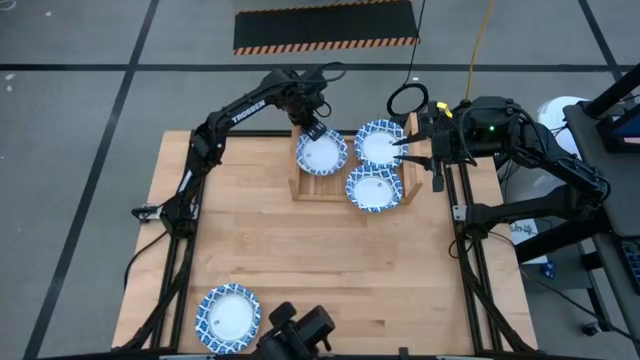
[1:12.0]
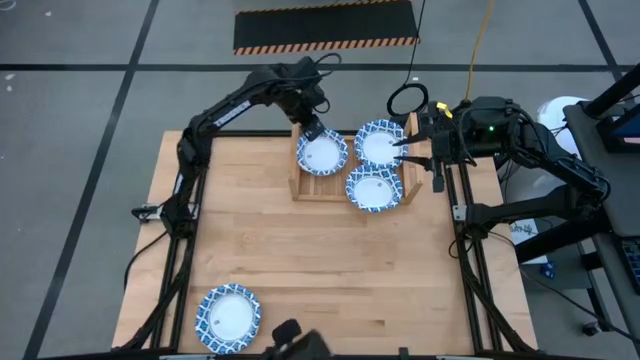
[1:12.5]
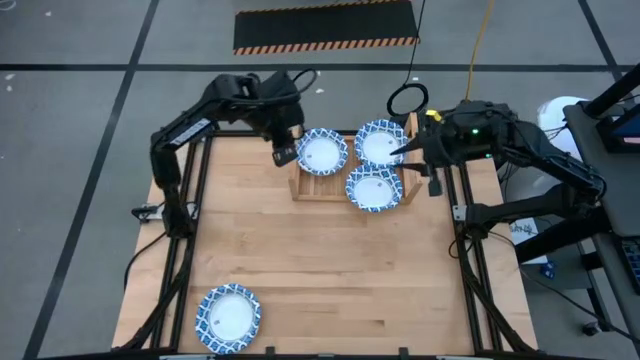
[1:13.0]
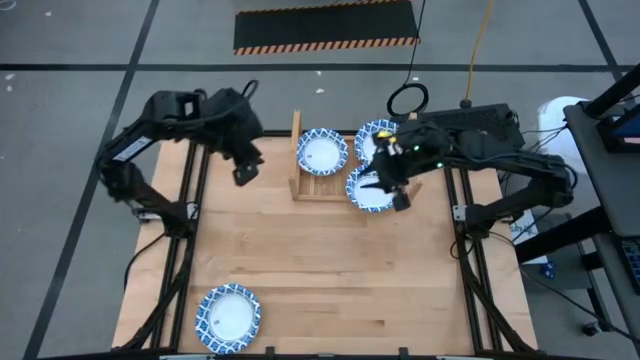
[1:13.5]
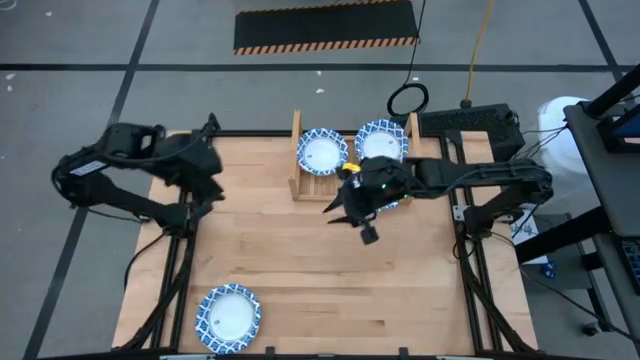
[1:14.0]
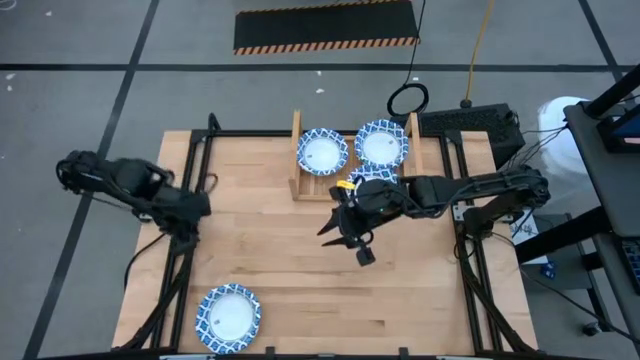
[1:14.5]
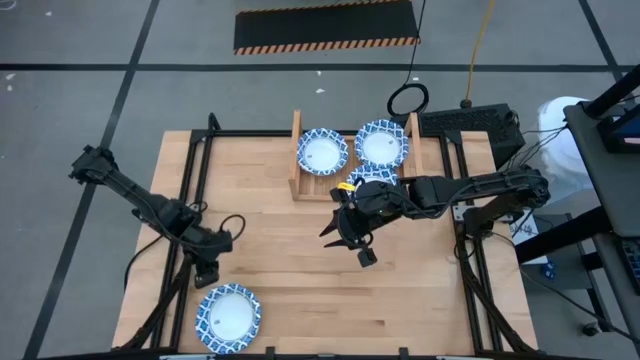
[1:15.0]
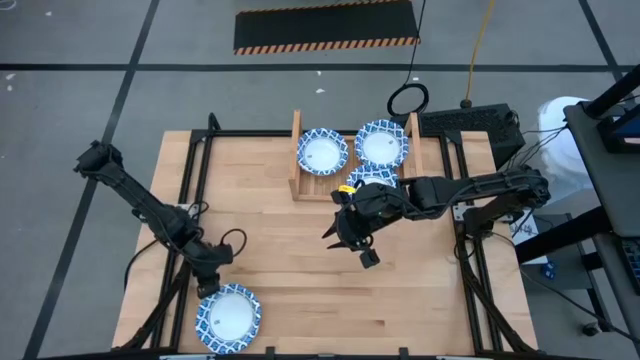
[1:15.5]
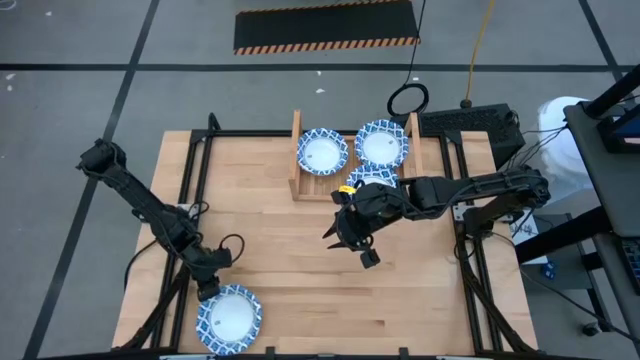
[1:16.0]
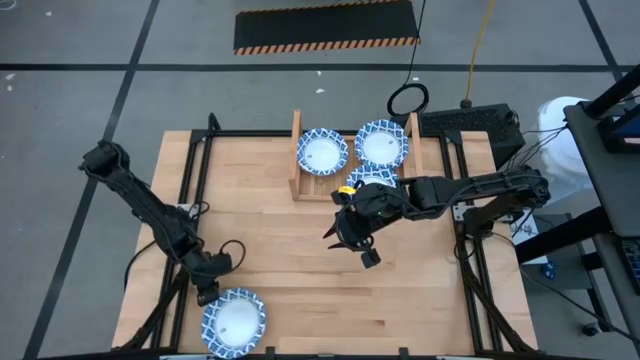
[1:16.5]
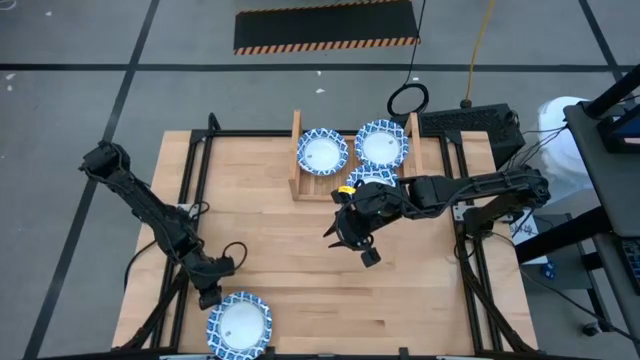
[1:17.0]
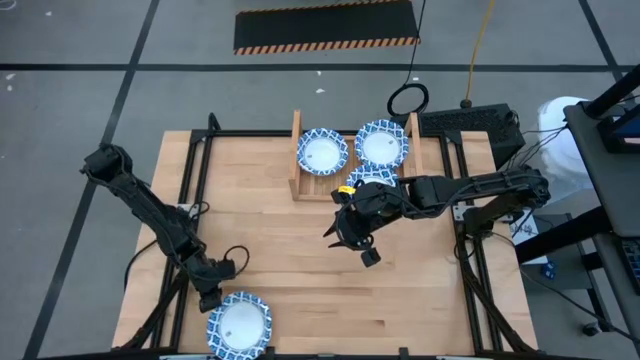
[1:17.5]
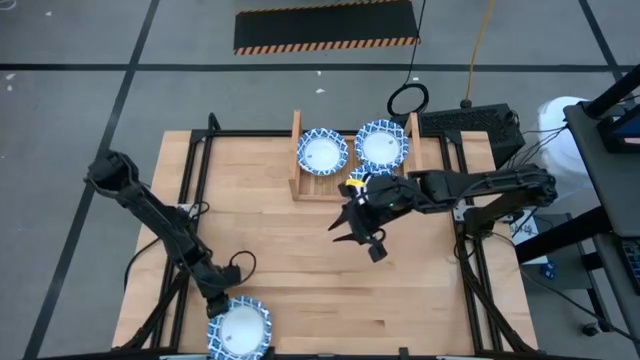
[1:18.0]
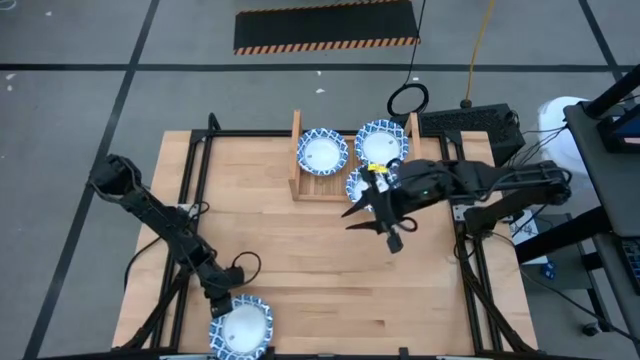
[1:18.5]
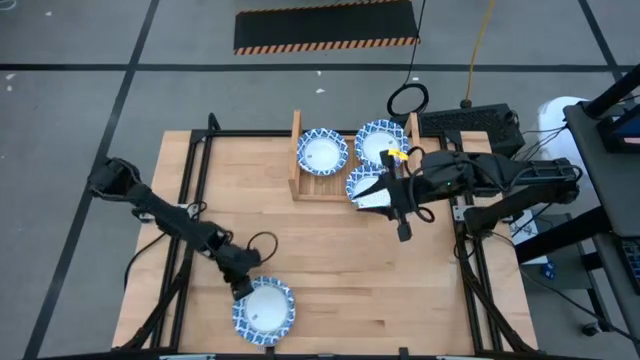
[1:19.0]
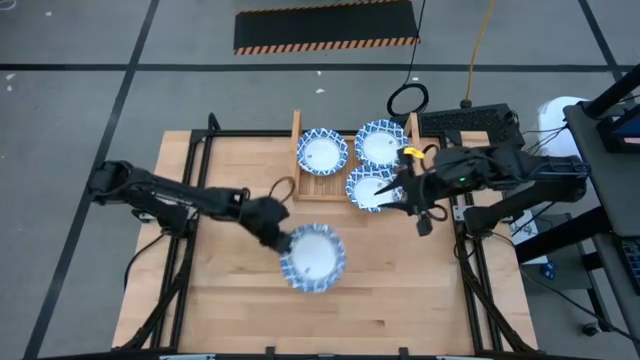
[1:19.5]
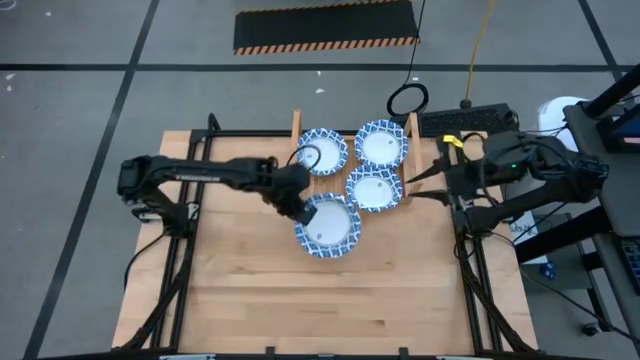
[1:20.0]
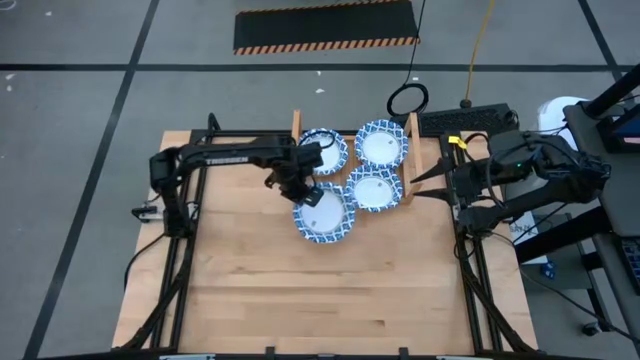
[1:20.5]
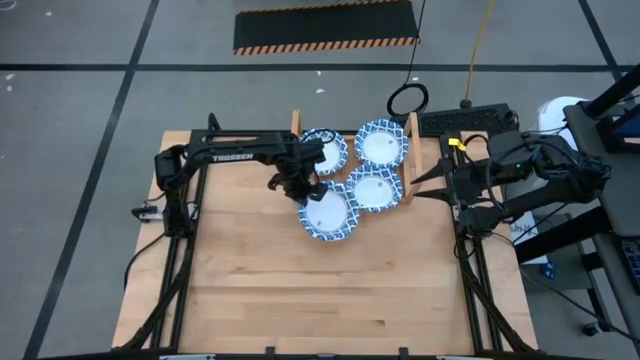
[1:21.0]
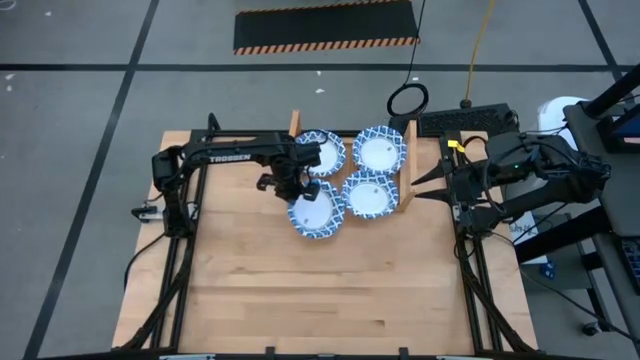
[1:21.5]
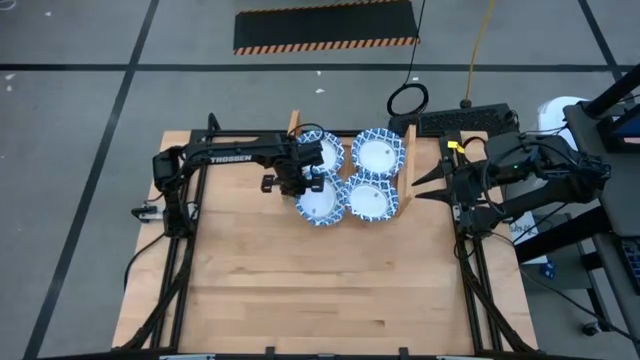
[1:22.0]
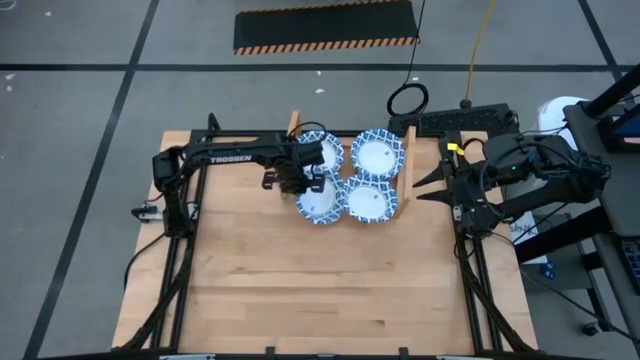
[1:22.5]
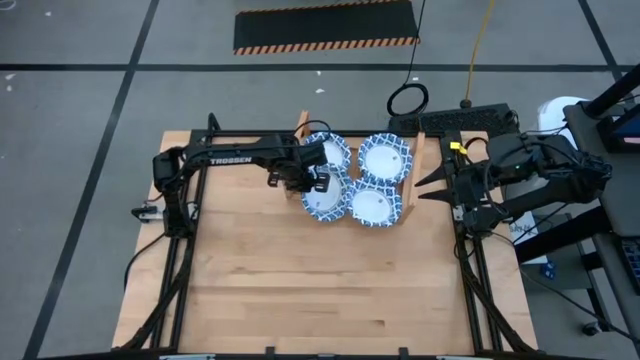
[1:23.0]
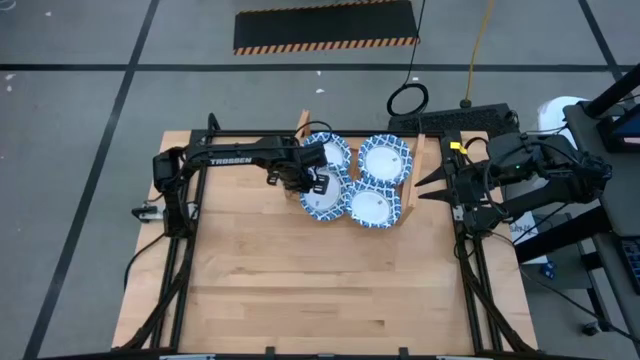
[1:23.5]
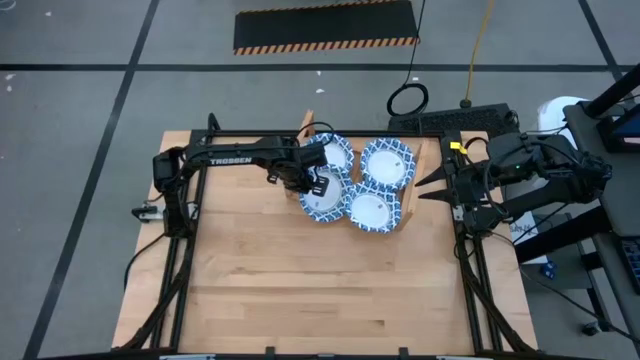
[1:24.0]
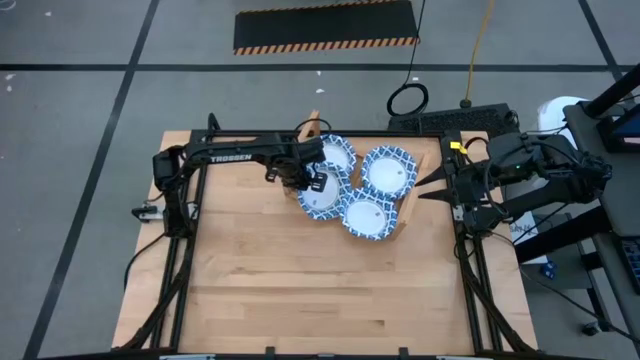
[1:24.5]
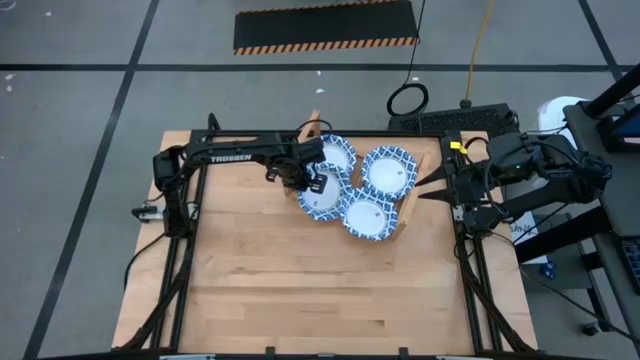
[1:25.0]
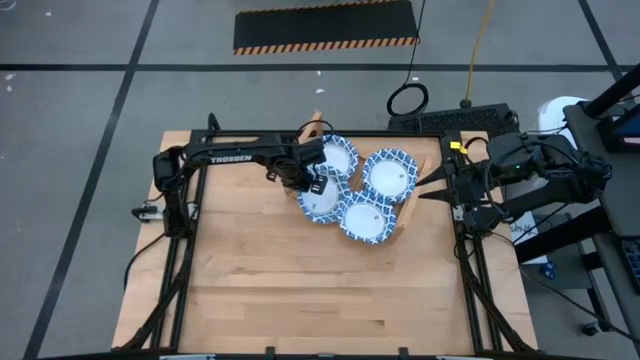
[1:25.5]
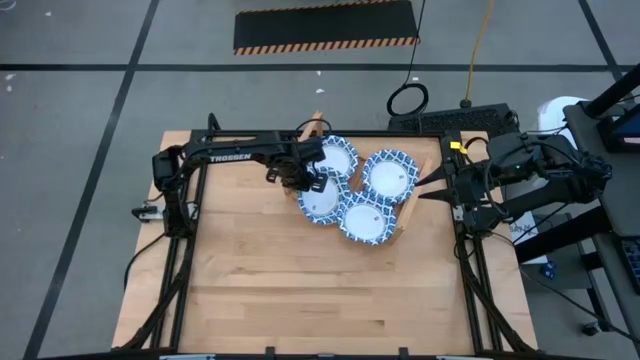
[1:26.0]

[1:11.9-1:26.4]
Task: Place and stack bowls onto a shelf
Put the blue patterned bowl on the shelf

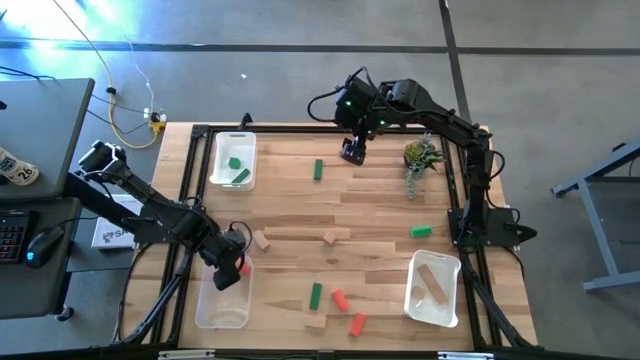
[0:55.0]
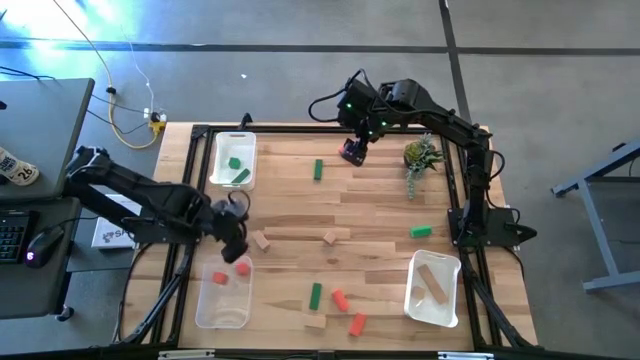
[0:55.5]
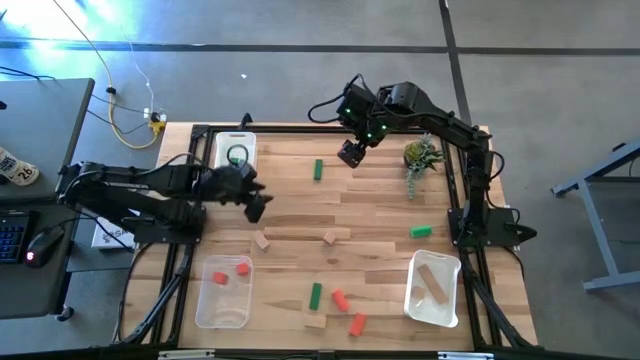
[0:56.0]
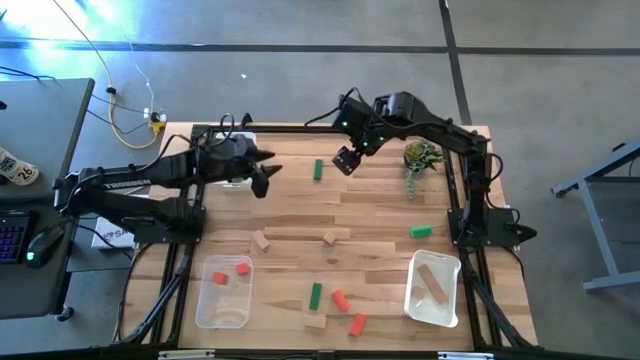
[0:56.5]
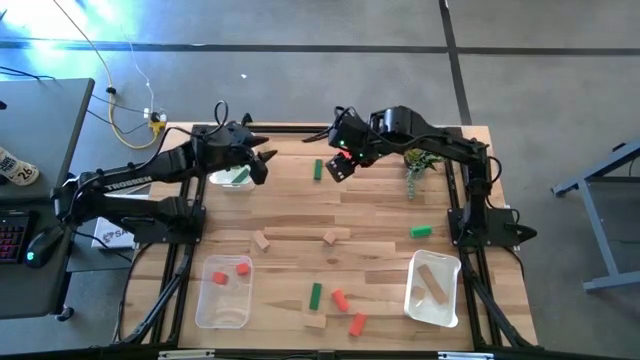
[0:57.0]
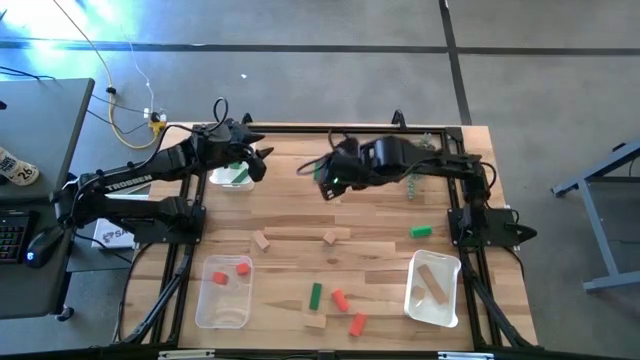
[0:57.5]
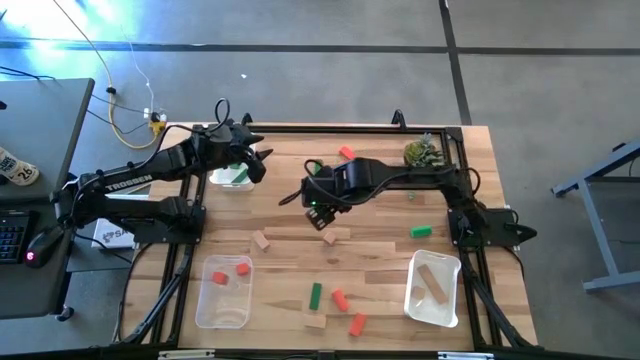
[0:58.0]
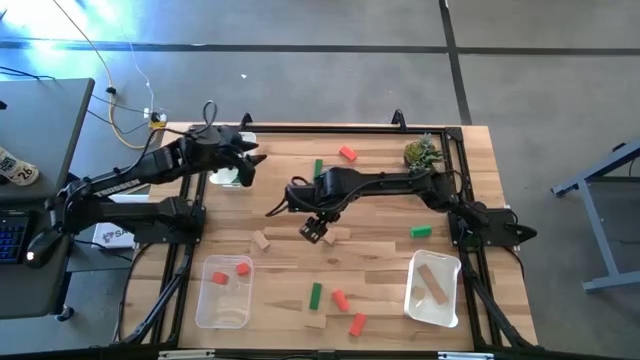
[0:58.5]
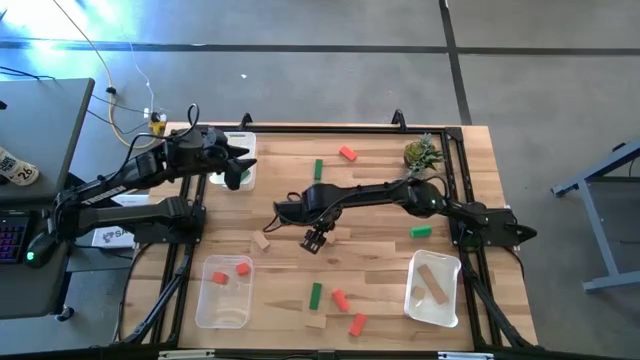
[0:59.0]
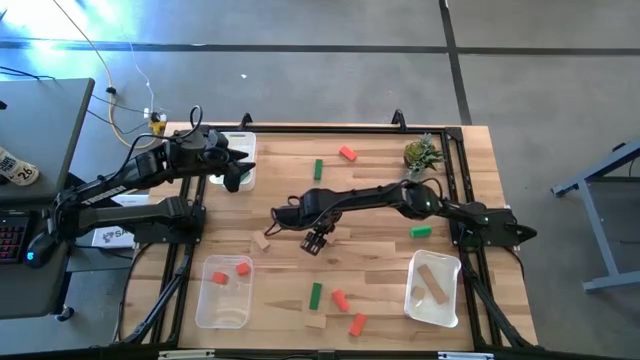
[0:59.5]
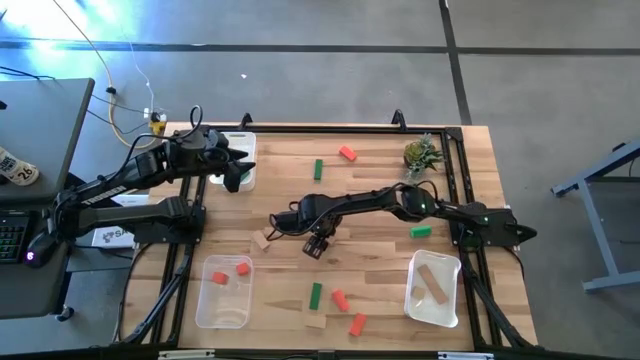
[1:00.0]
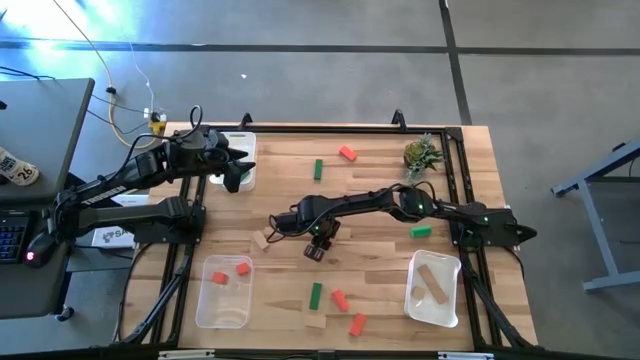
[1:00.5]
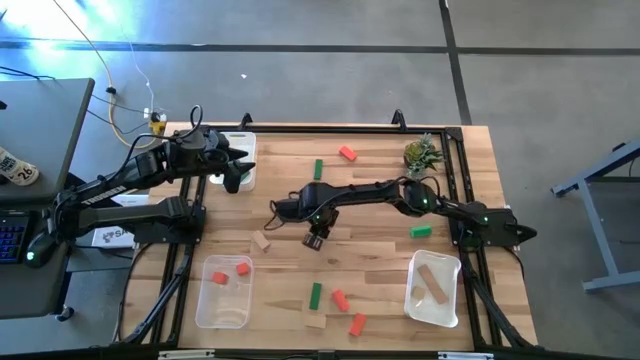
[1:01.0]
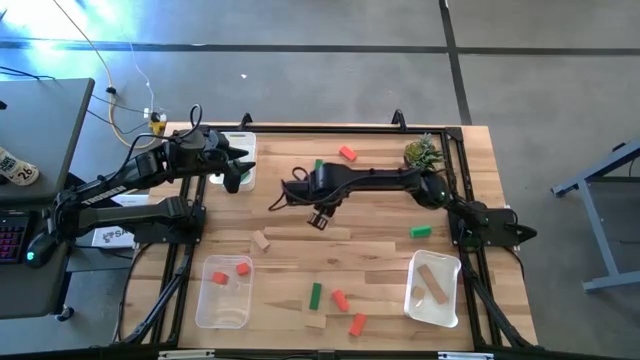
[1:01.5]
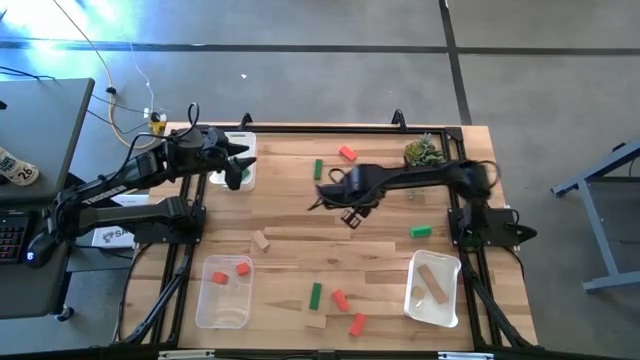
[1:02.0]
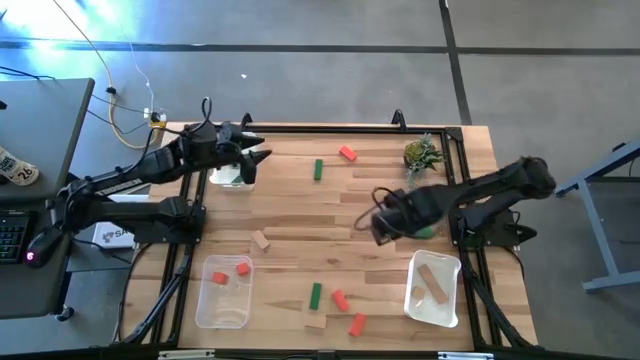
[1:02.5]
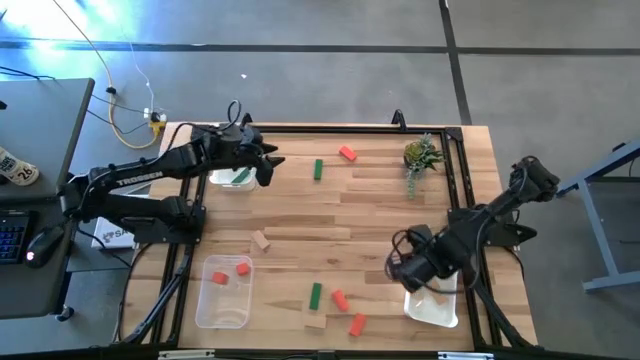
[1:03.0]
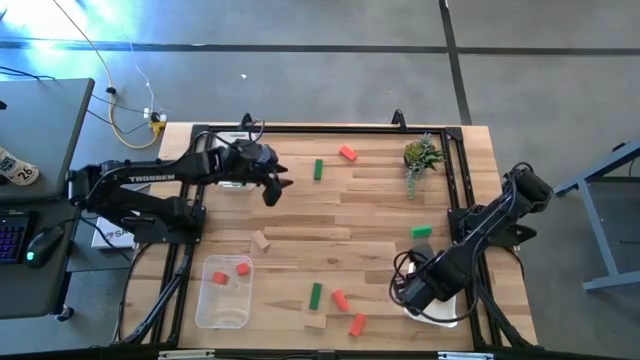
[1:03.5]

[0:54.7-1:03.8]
Task: Sort & place blocks by color
Put the brown block into the bottom white bin
